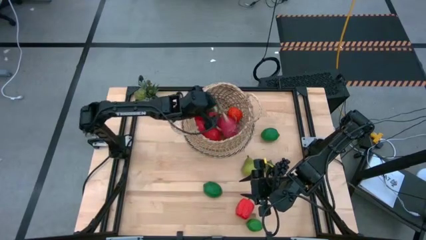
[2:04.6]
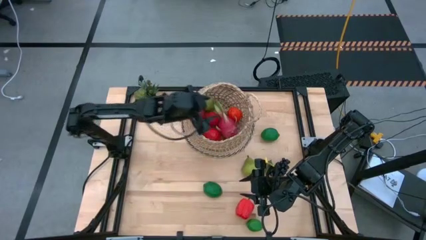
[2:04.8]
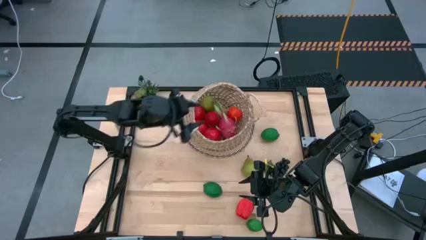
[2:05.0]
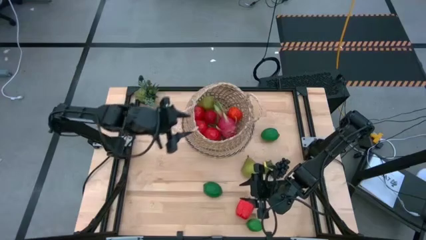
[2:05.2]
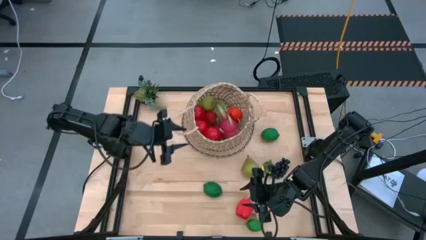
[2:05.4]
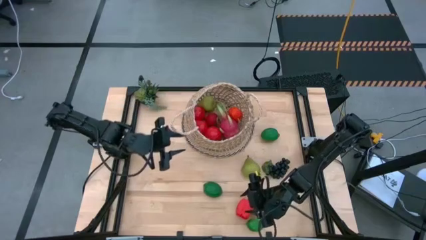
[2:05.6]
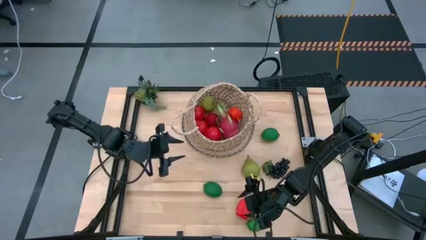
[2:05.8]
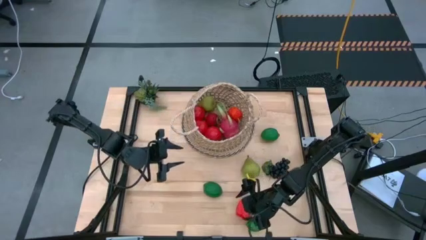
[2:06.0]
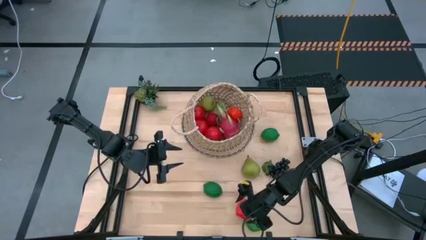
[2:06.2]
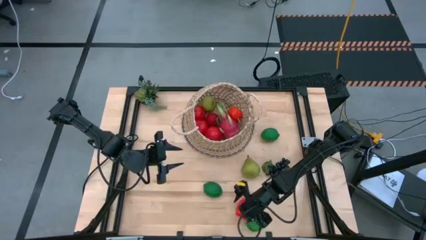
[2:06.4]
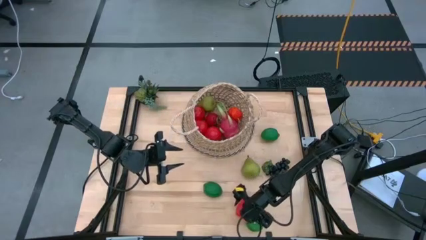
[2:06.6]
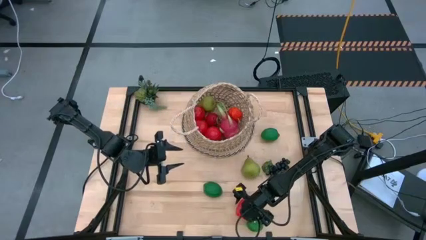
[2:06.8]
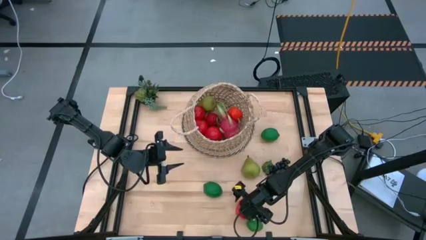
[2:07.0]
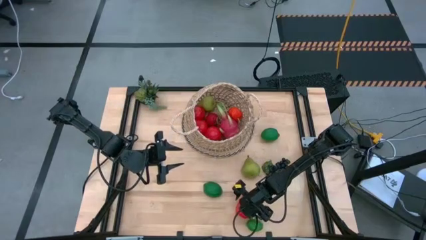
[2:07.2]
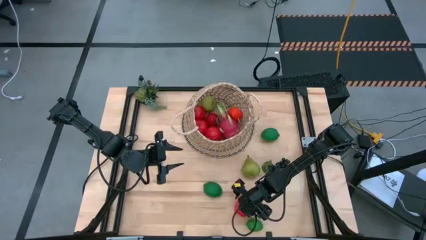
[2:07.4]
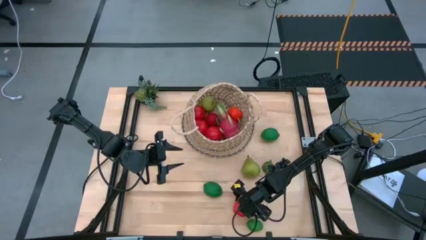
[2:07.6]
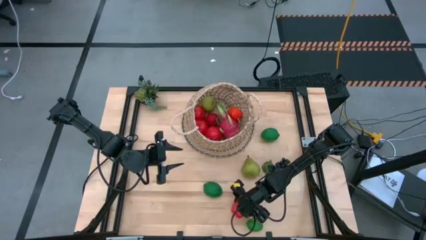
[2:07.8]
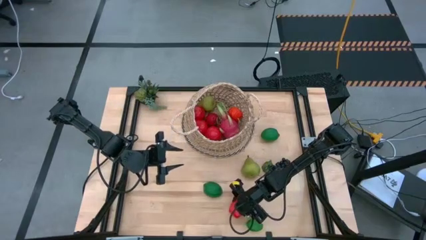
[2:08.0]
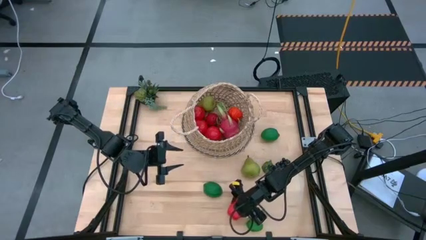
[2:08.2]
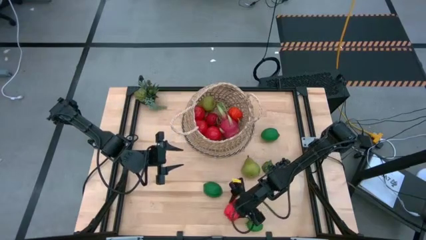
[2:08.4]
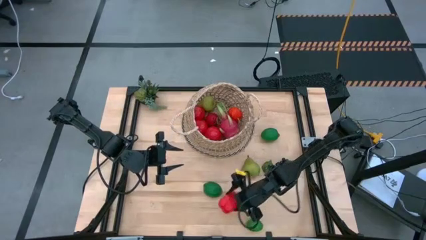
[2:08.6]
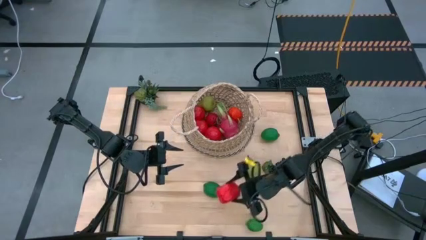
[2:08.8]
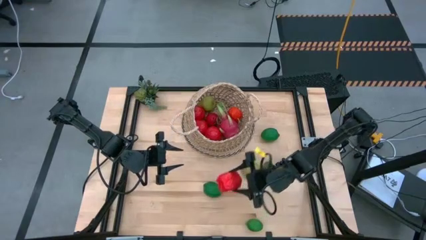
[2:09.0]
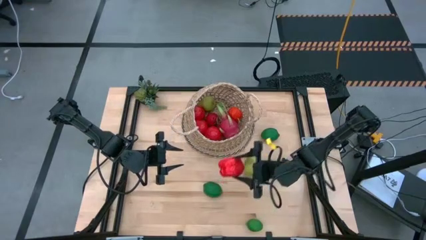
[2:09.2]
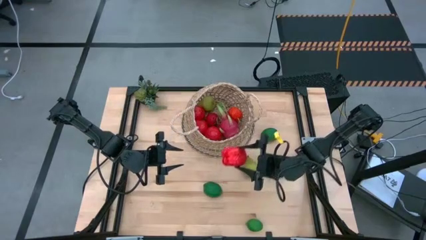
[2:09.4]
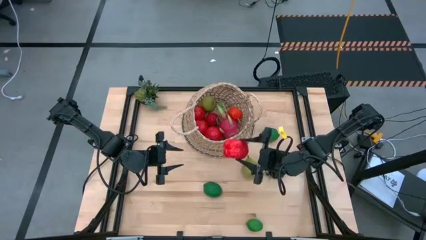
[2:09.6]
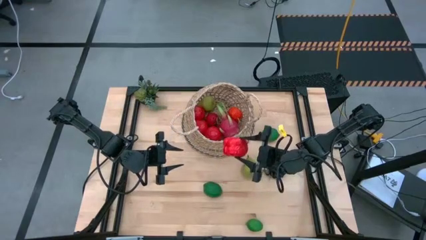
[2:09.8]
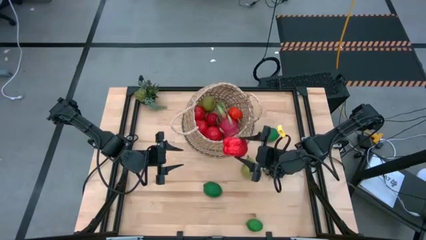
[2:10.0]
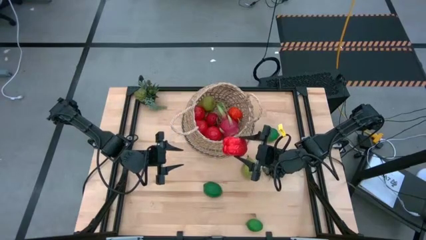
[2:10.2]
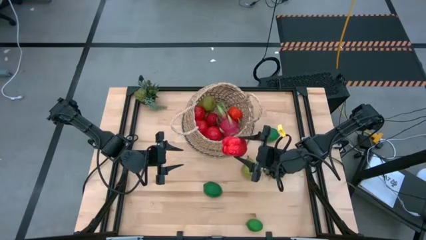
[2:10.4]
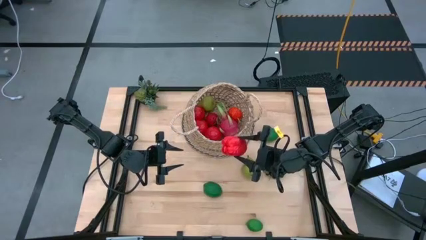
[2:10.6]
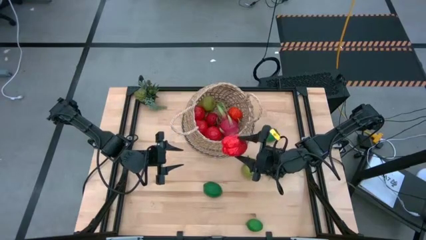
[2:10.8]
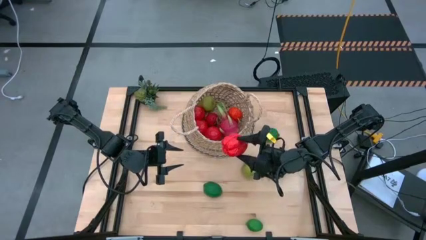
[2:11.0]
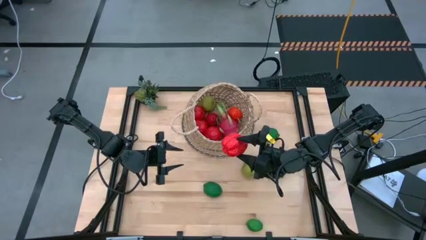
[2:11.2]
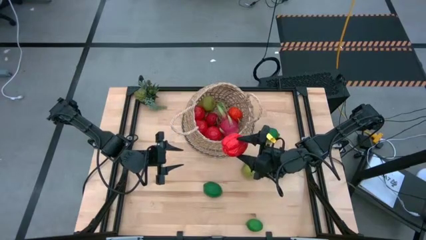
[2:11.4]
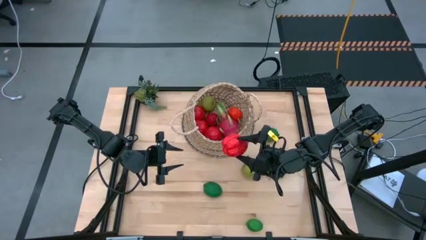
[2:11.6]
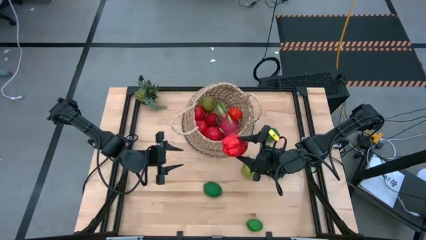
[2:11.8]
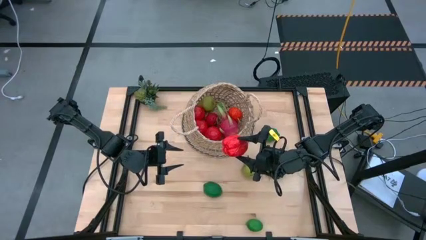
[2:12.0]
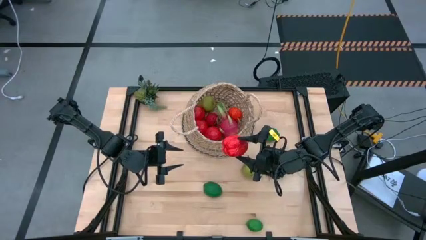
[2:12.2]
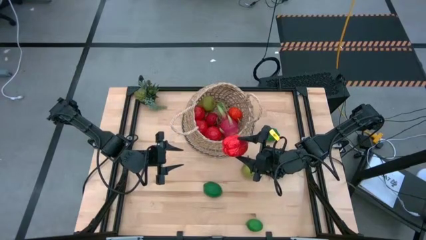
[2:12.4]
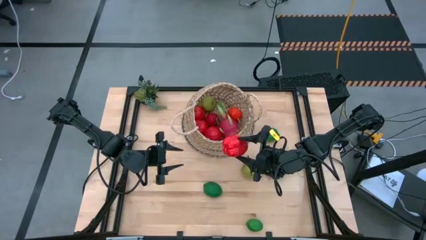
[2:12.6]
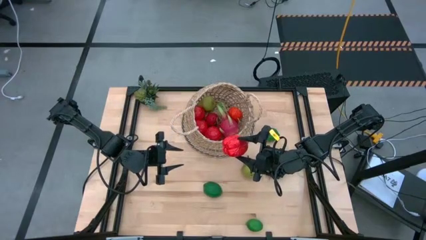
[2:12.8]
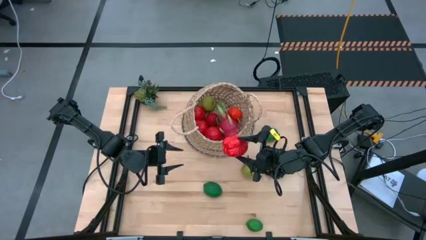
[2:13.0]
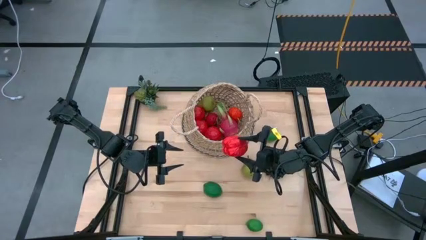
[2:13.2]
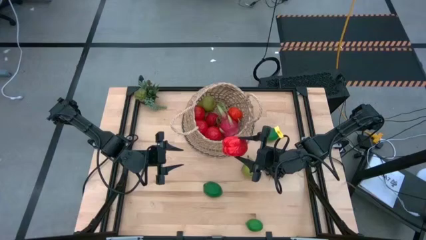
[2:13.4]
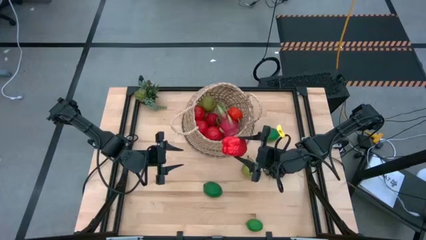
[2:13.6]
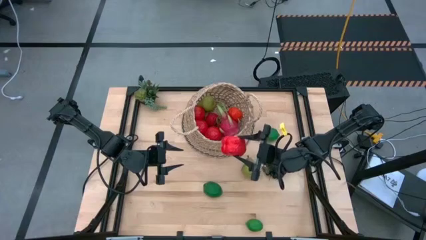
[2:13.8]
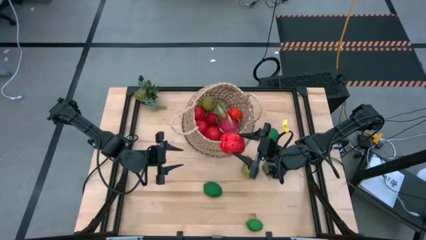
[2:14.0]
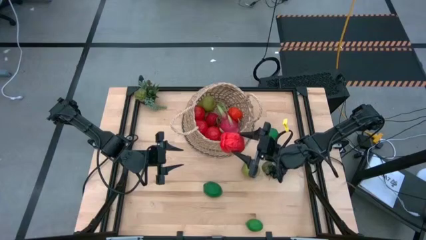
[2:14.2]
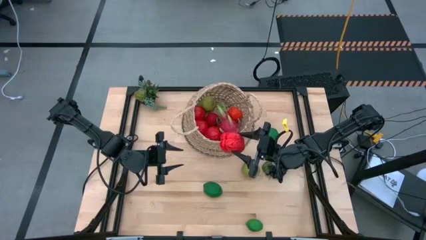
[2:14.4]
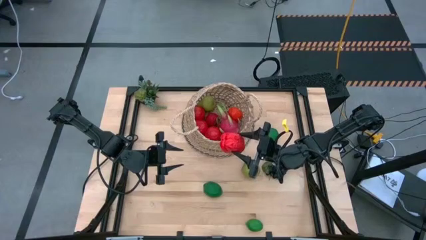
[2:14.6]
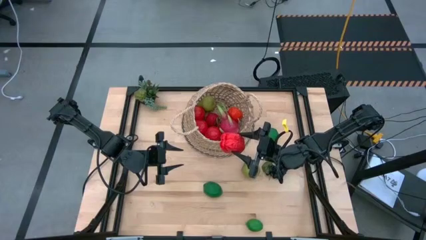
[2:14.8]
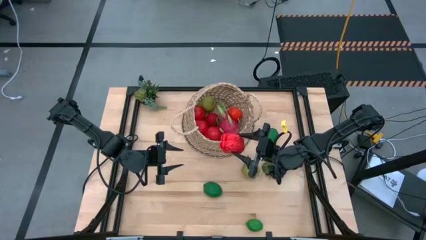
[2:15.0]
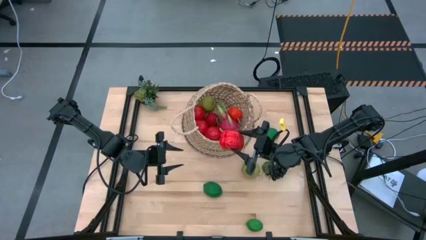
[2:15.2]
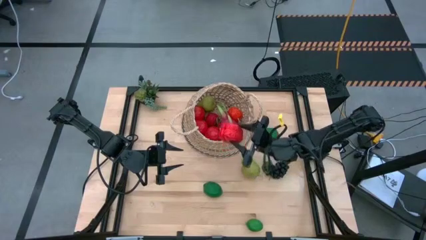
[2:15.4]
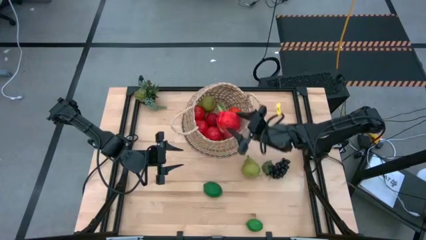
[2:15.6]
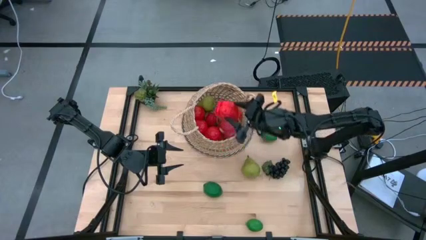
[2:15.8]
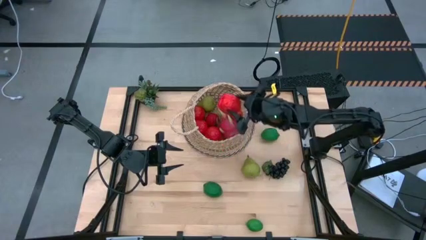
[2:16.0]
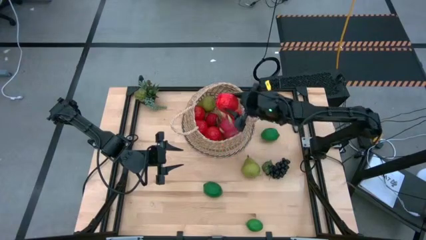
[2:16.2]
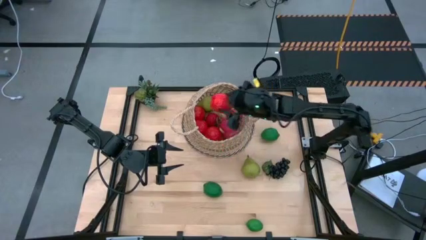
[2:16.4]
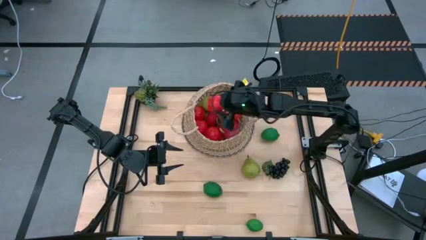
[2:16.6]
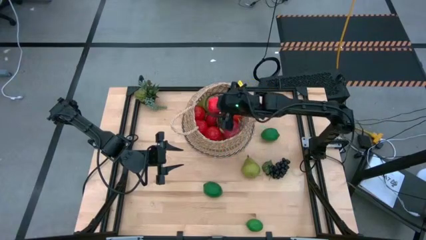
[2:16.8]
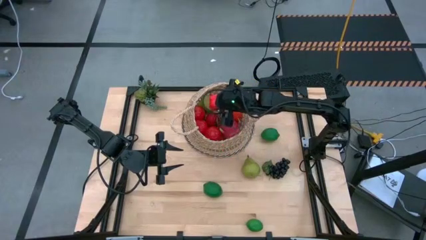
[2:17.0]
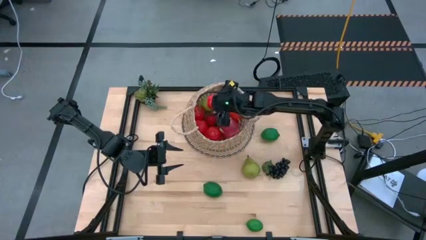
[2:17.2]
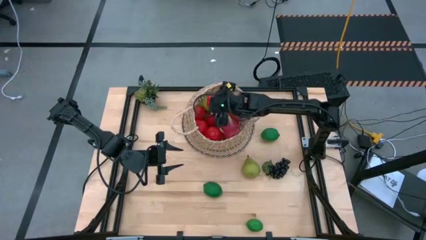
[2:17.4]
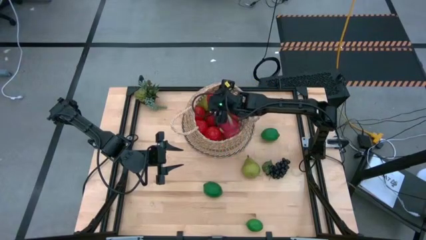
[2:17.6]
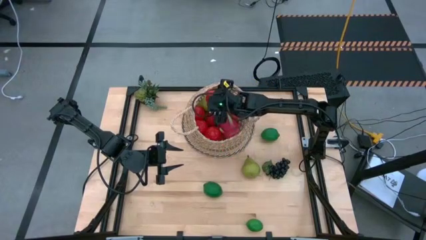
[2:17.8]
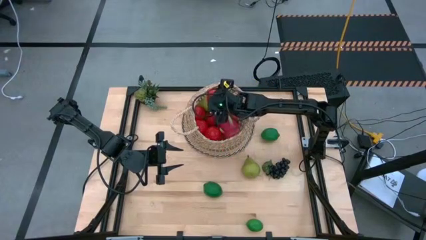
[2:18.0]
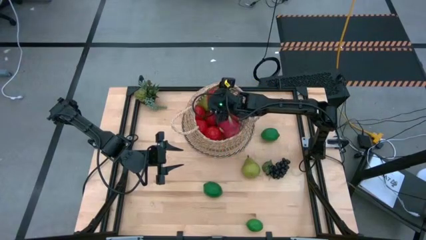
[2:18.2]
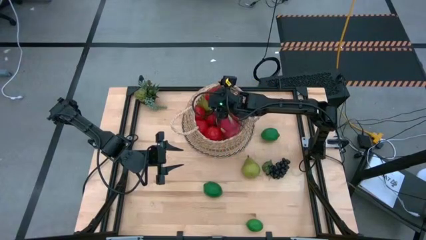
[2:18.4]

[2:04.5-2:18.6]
Task: Build produce basket
Put the red bell pepper into the basket
